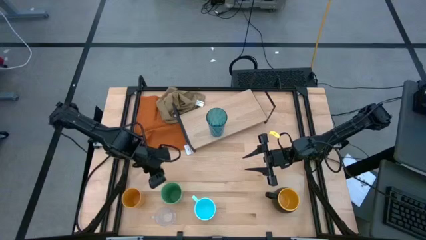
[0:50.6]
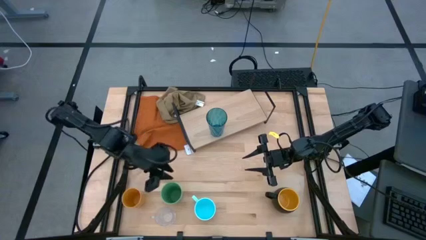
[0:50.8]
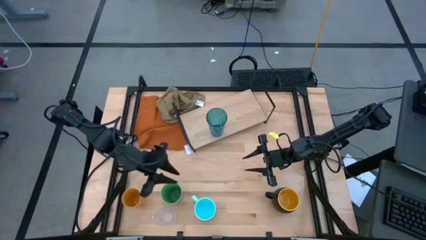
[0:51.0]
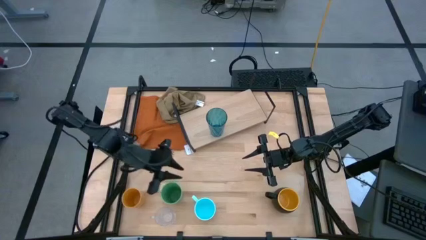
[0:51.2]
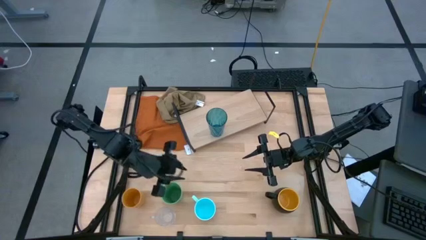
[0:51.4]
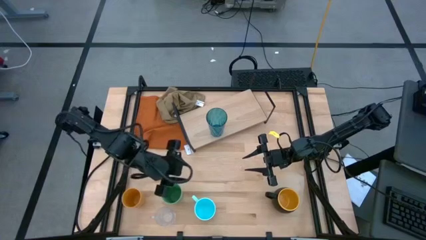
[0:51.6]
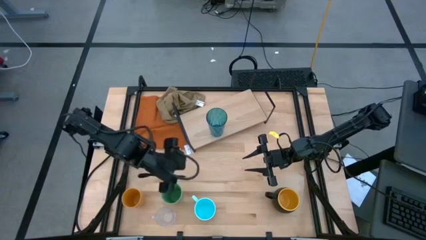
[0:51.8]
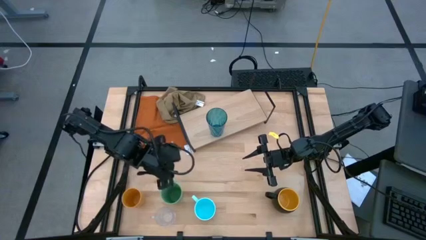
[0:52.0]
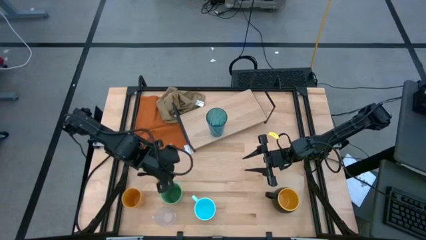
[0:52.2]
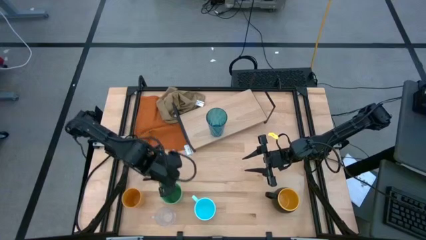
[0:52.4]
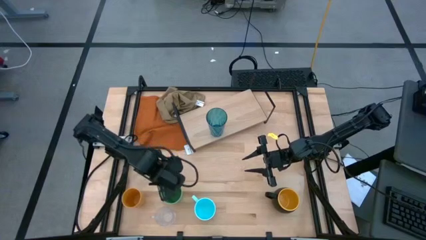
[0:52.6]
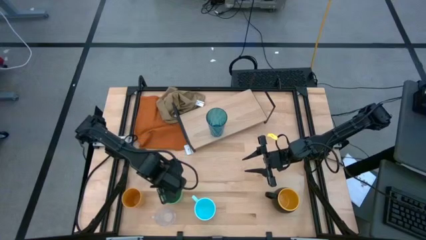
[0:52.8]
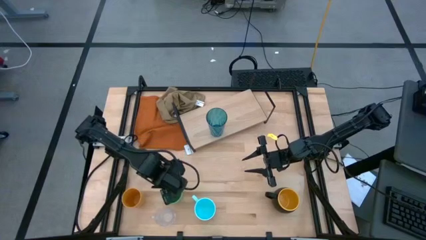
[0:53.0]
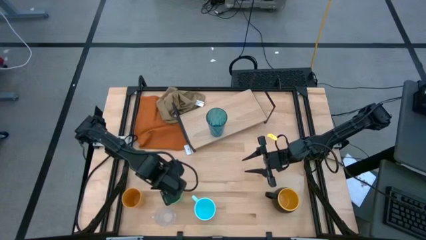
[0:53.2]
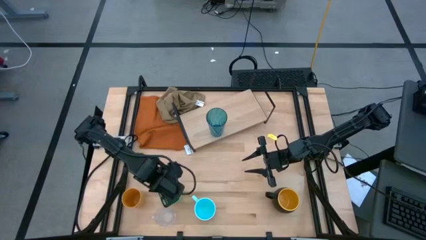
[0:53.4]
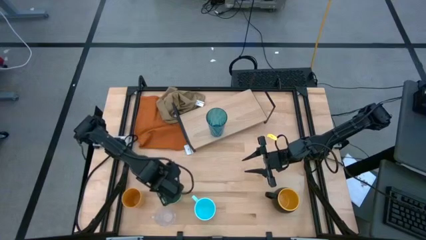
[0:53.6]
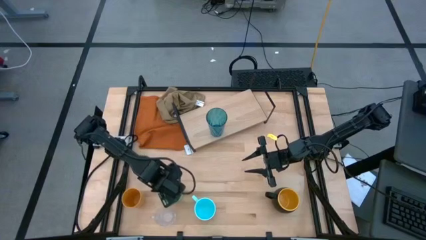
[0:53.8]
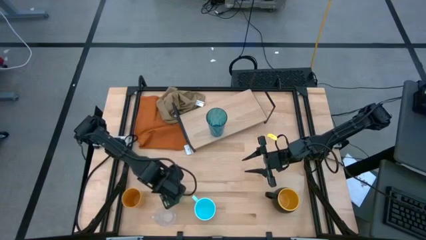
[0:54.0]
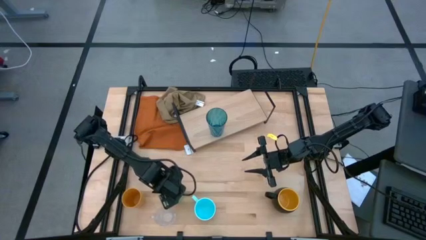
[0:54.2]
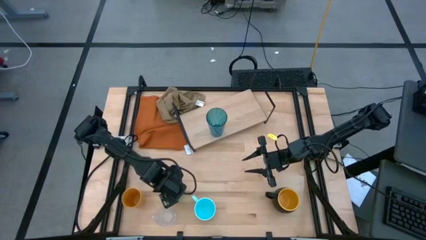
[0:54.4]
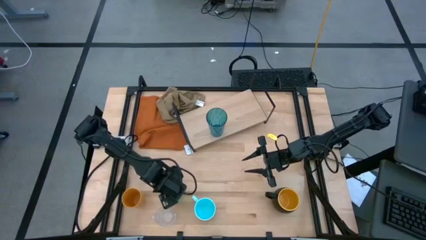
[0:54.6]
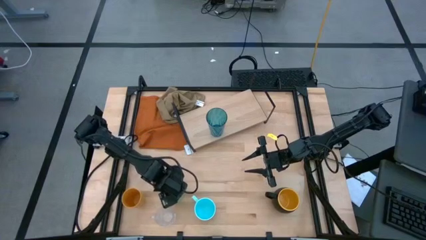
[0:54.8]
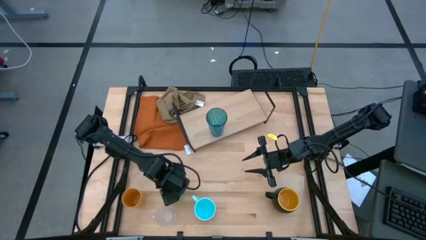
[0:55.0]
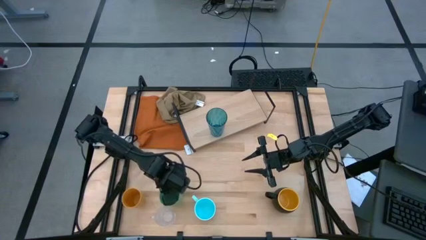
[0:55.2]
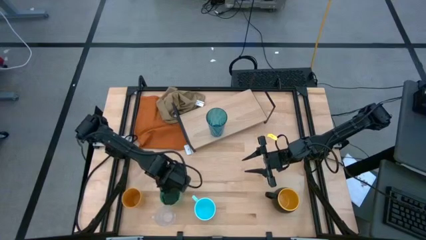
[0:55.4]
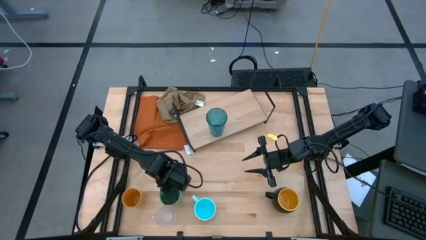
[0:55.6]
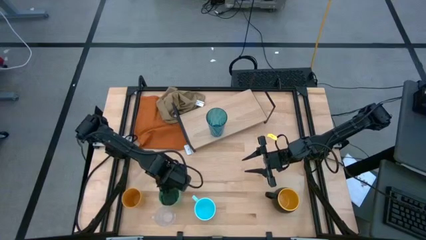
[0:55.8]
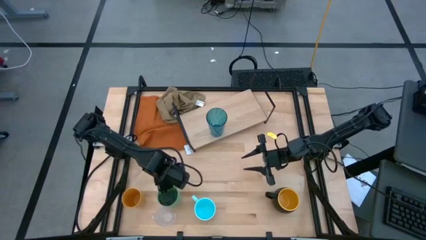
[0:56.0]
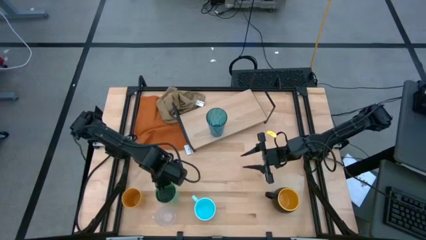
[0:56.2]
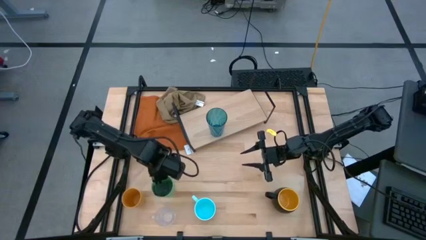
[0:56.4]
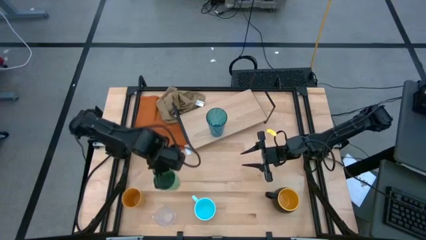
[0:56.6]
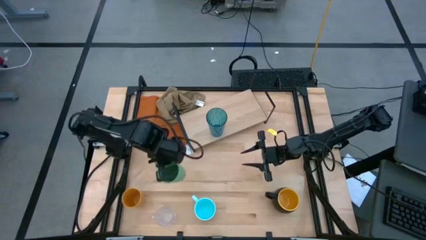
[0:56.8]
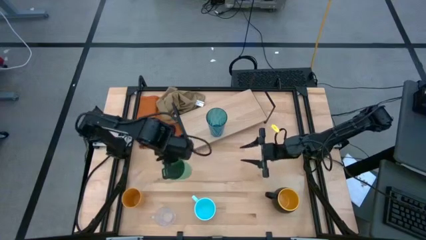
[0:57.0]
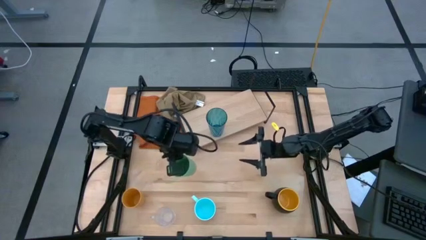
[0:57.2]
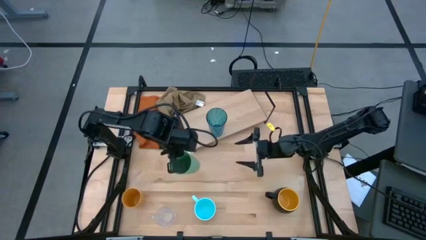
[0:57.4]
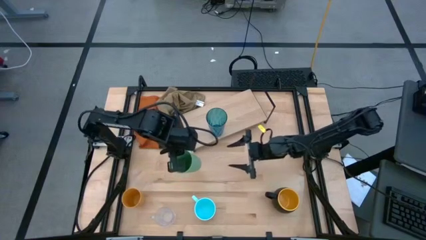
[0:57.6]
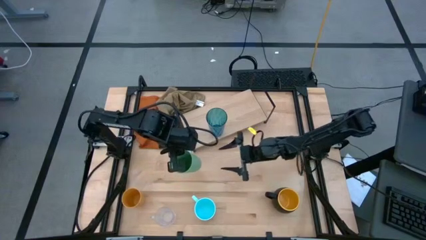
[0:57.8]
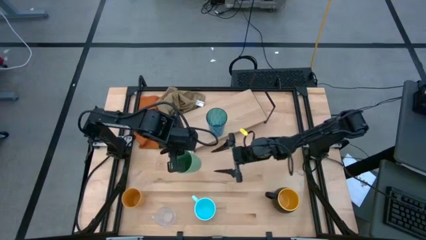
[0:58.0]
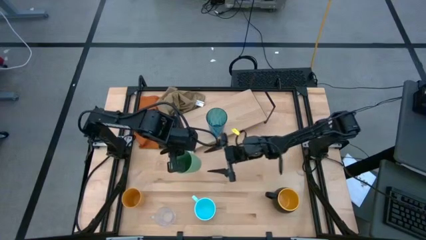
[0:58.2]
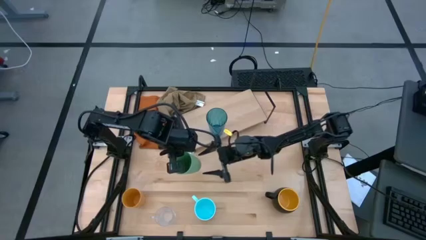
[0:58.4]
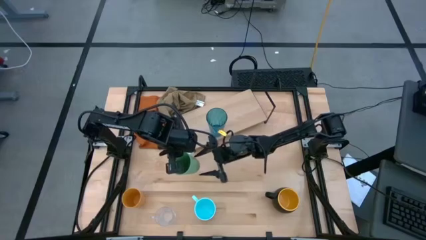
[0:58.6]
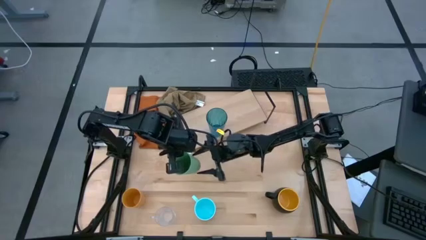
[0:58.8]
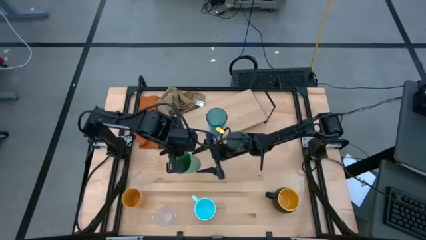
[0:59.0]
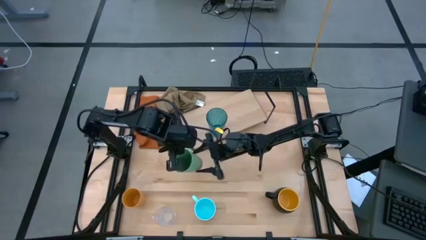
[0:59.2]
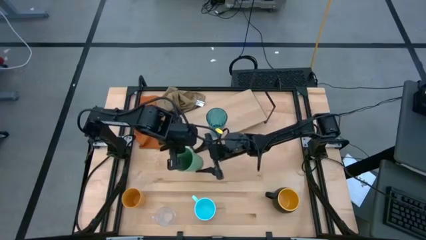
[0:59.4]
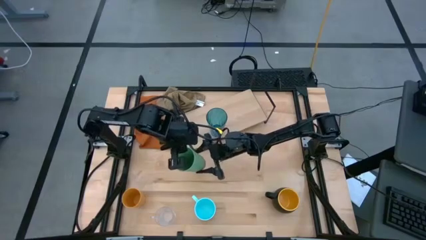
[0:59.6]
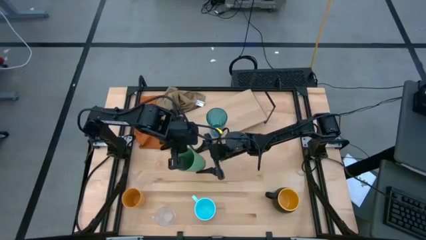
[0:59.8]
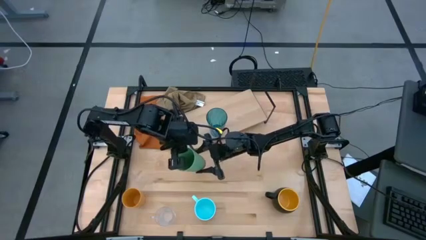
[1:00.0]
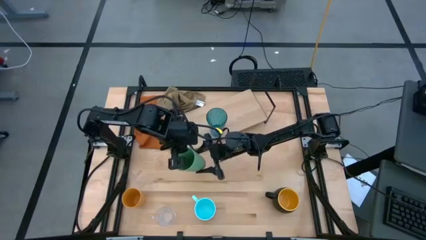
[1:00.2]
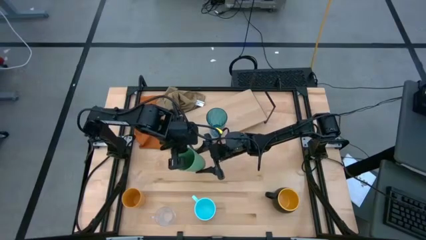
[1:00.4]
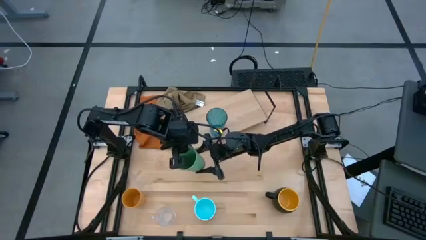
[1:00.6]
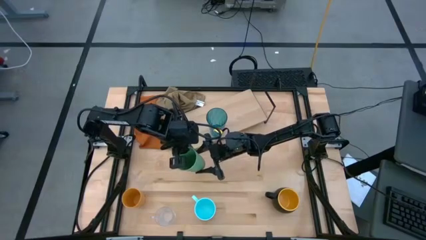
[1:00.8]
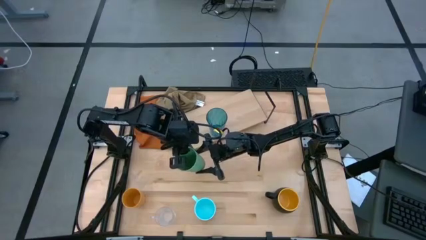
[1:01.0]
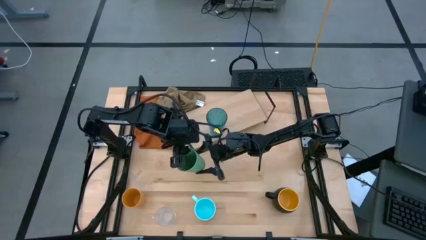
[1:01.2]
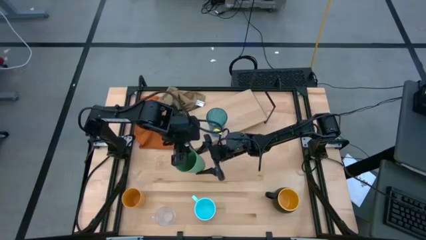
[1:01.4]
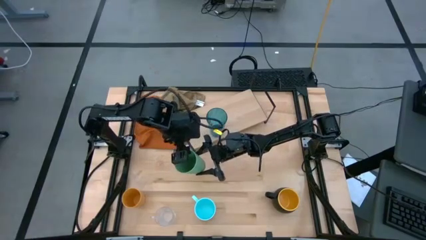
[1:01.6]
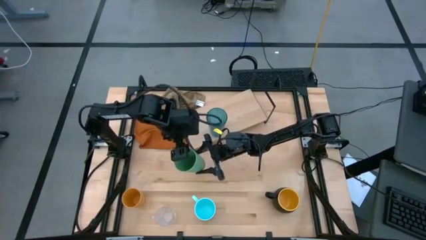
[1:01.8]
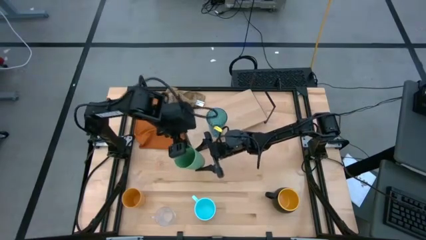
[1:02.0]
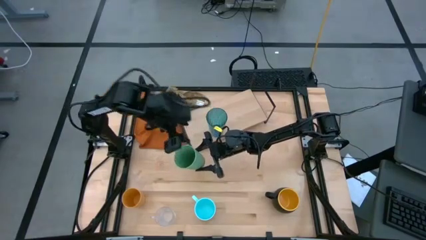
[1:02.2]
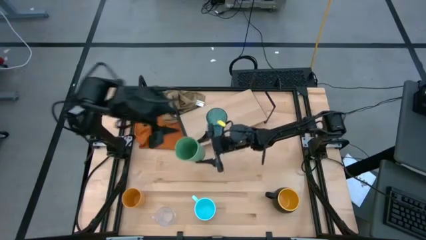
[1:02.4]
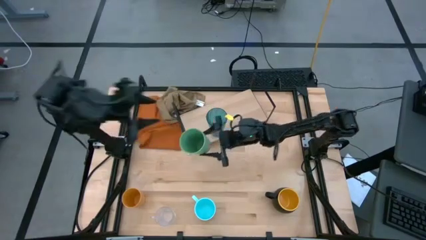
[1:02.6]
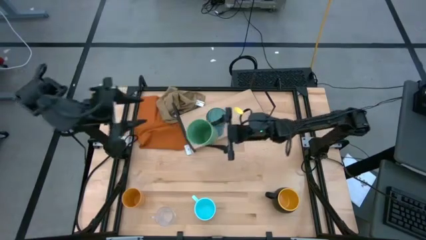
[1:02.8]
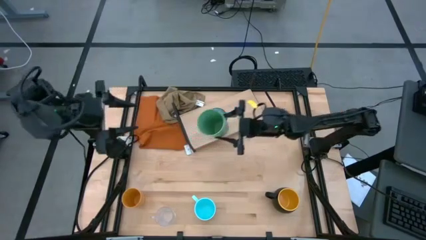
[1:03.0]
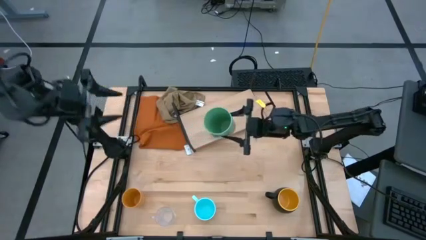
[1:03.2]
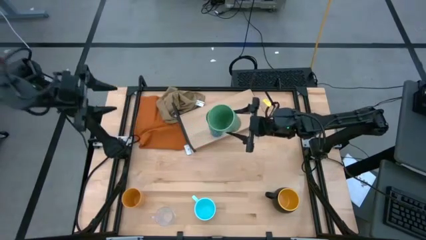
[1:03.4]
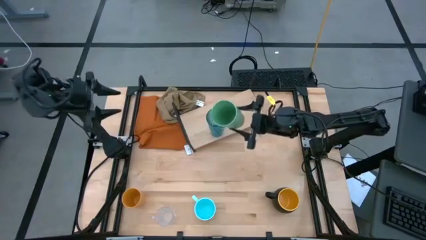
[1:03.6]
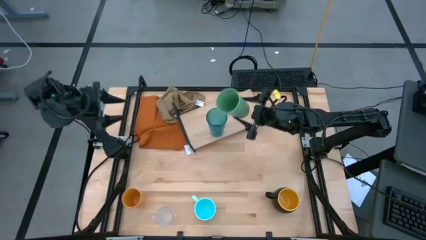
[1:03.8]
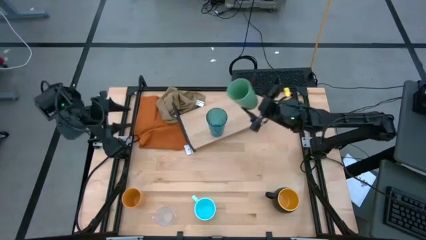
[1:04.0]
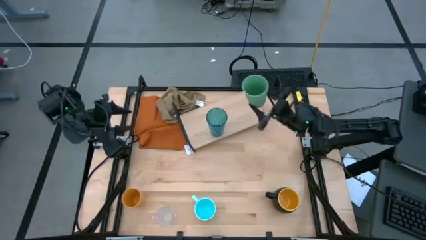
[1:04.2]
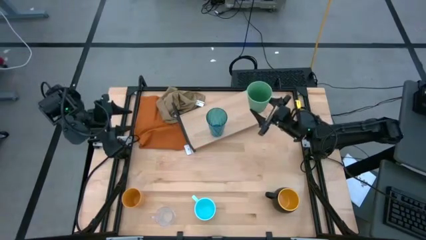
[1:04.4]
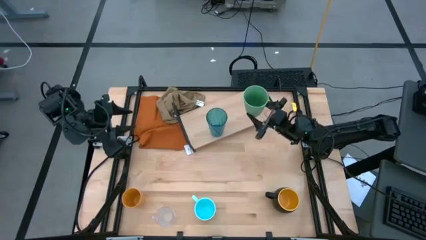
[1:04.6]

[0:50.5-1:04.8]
Task: Stack small to large cups/mugs on shelf
Put the green cup on the shelf
